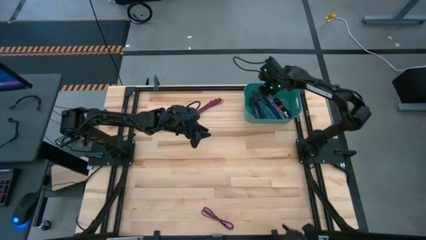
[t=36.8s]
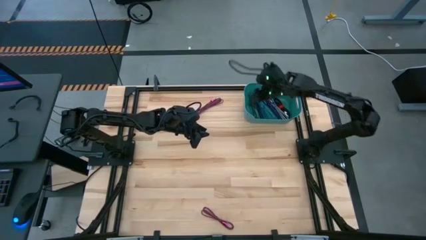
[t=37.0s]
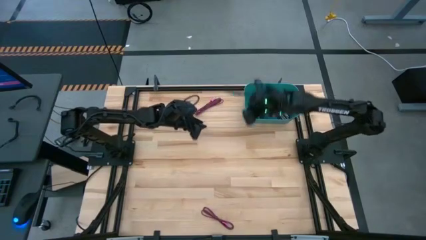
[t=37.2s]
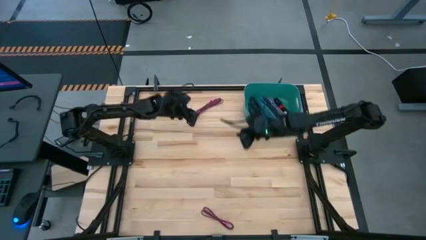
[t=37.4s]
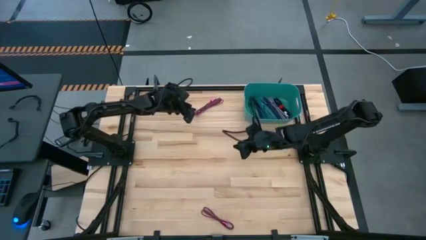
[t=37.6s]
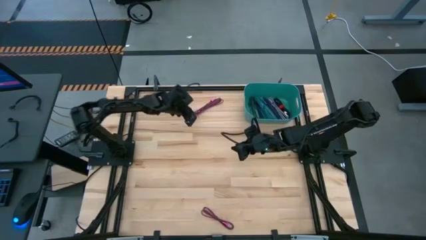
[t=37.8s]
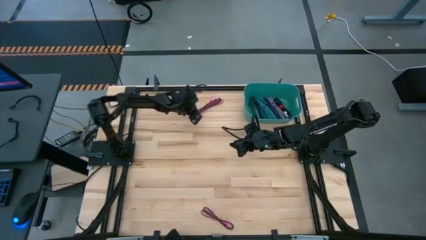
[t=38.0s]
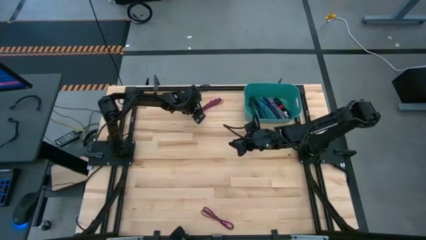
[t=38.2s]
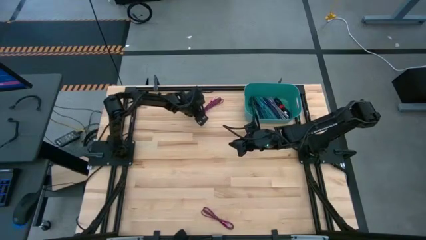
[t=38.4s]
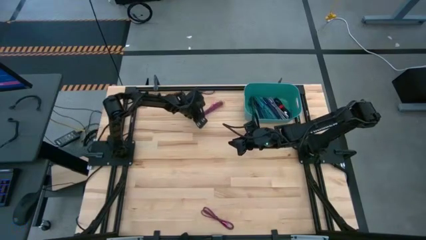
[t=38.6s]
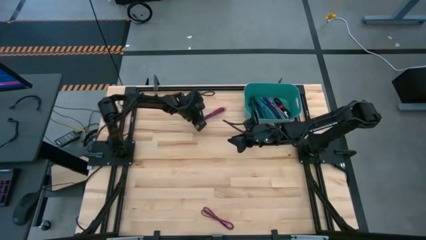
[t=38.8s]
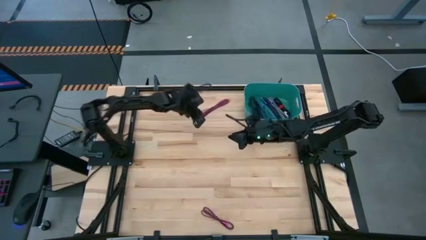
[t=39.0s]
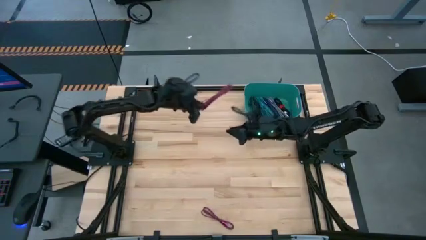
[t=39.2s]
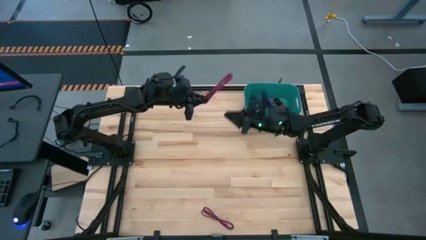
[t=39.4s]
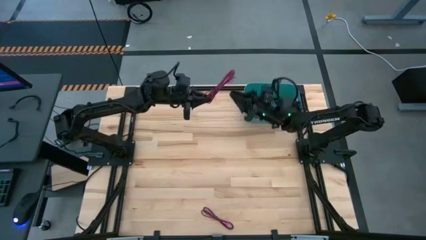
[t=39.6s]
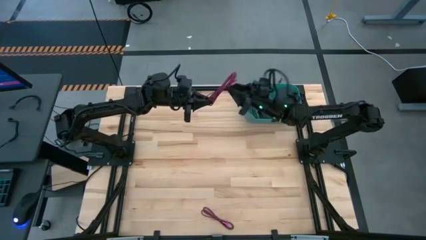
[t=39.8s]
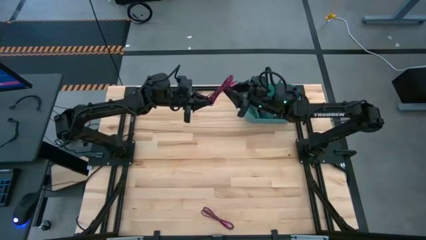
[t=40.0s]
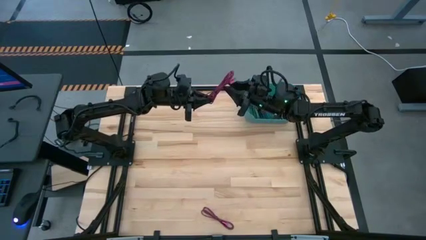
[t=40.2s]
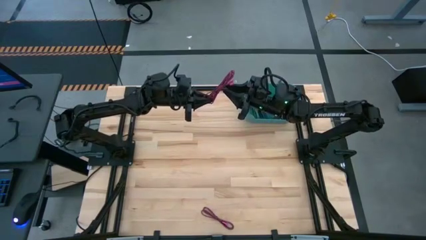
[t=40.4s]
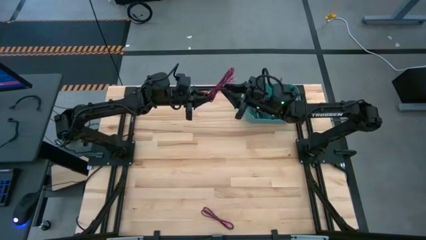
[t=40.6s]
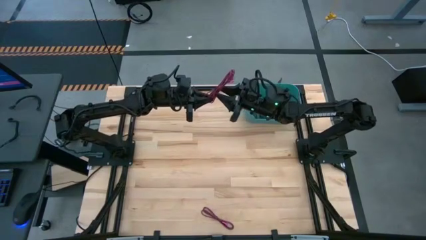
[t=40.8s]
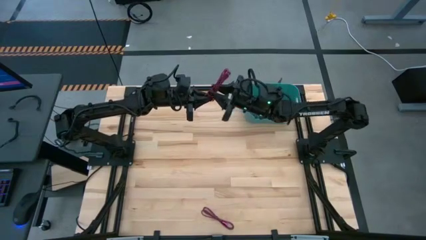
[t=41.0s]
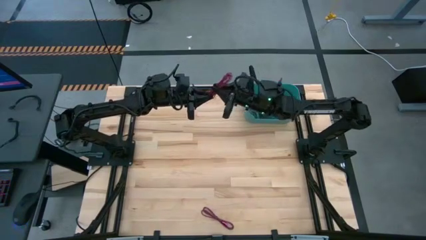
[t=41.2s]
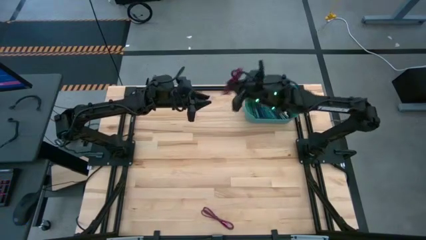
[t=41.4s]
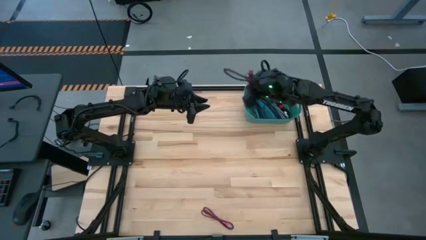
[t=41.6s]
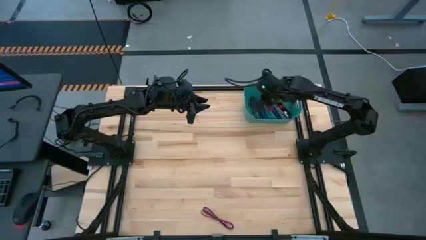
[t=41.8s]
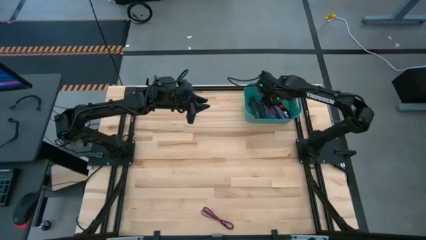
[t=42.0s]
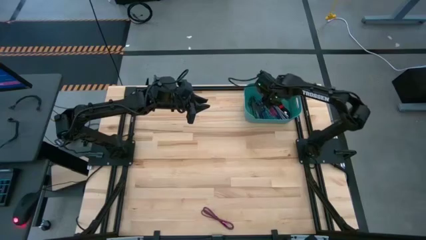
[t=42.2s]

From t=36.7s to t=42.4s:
Task: Pick and place USB-C Cables
Put the pink charger cable into the blue bin

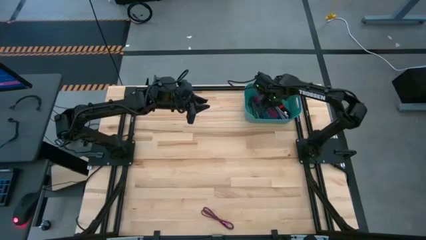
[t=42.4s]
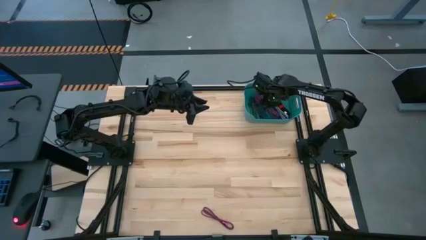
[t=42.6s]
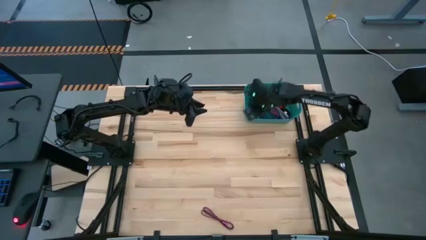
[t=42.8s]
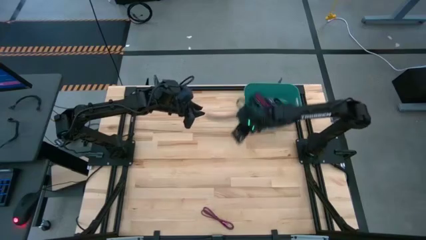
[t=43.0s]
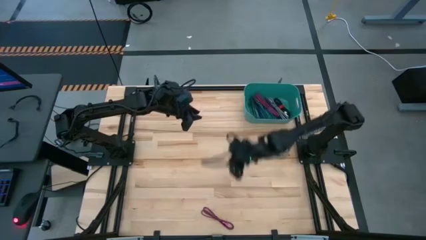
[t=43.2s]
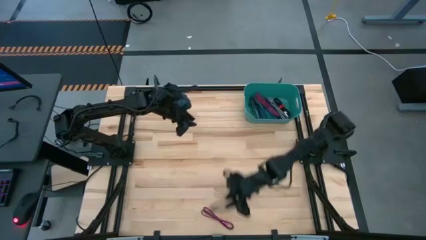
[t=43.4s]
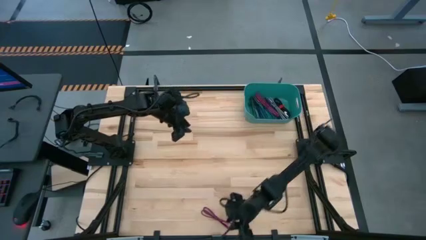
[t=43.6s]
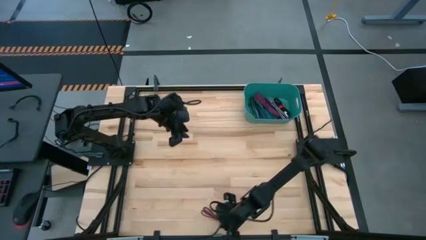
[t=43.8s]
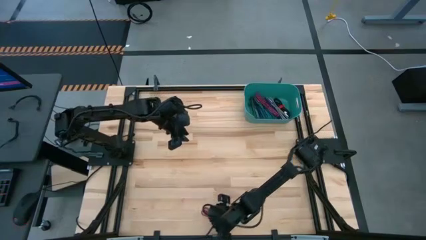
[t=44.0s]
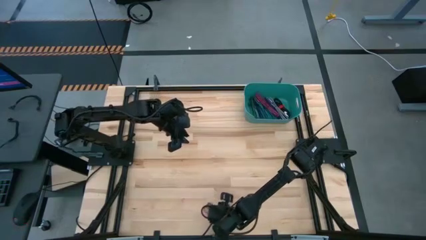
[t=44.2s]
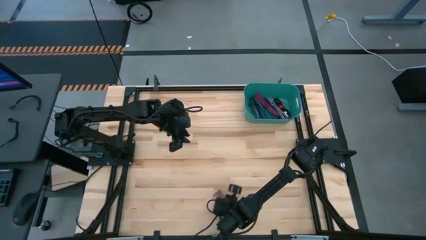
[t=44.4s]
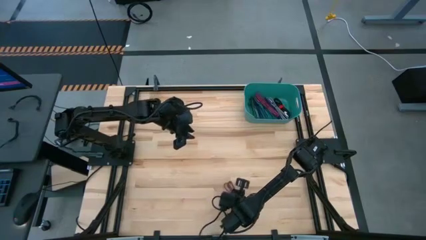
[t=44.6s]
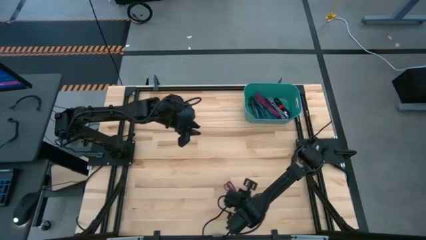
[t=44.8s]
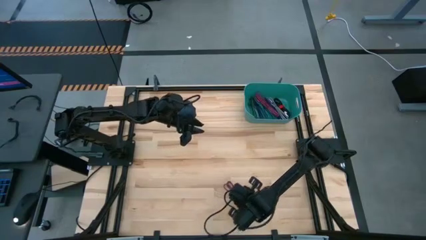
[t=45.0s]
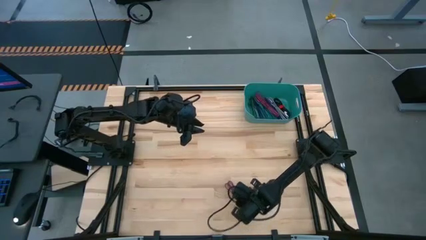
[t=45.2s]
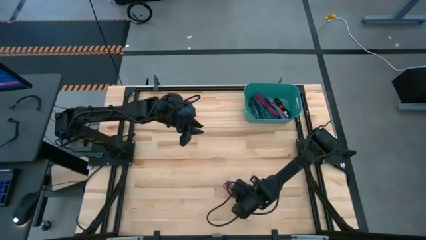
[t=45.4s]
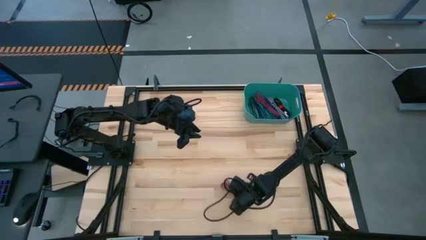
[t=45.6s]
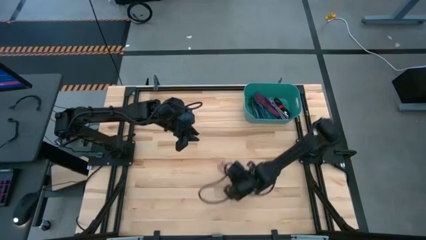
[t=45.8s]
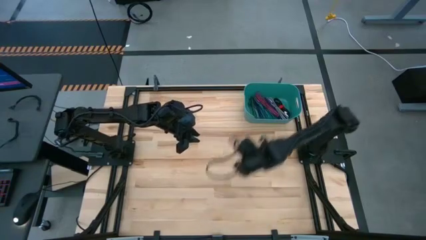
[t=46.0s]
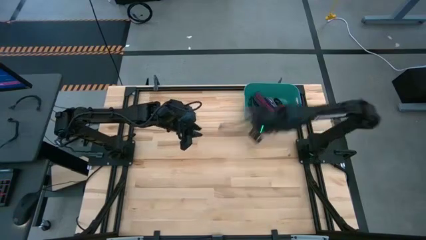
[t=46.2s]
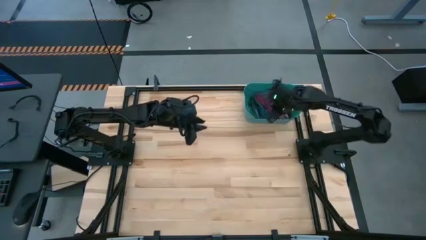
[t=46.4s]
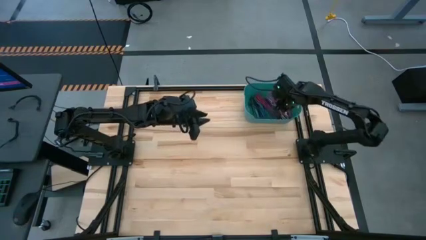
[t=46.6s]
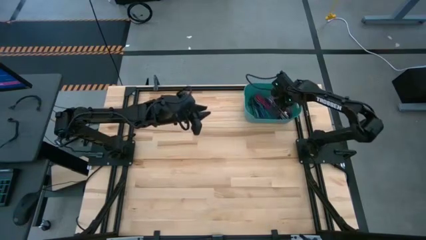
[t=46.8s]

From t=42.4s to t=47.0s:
Put the pink charger cable into the blue bin

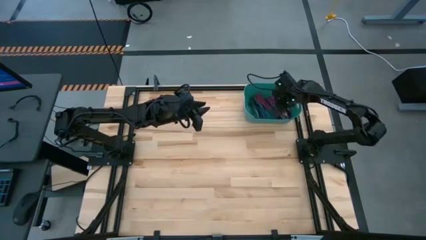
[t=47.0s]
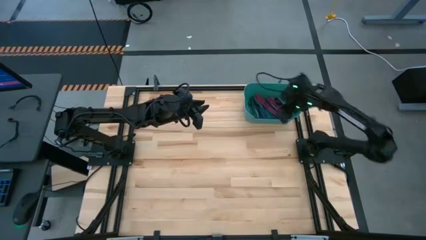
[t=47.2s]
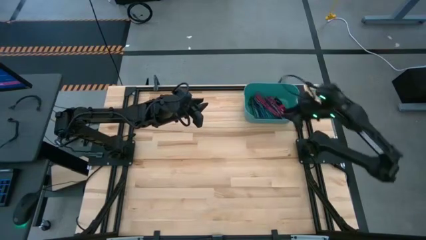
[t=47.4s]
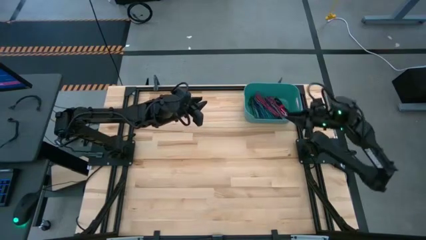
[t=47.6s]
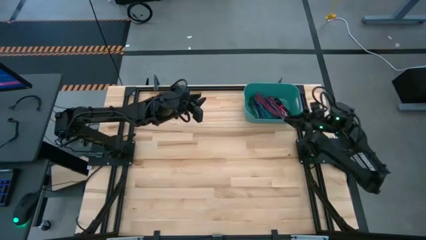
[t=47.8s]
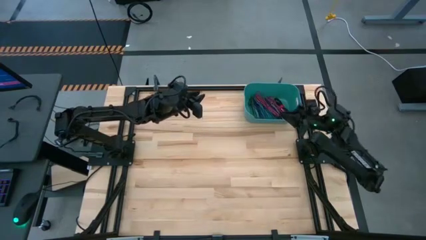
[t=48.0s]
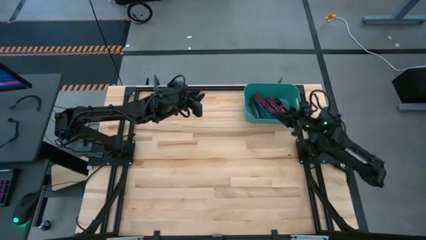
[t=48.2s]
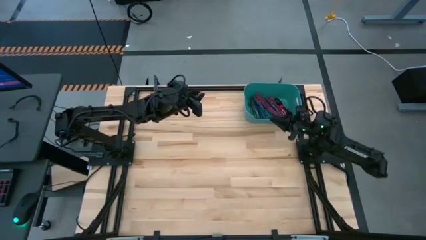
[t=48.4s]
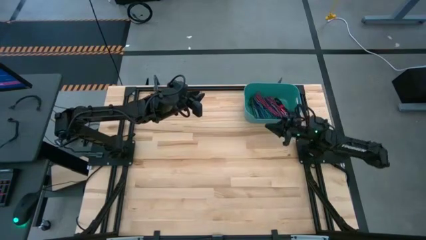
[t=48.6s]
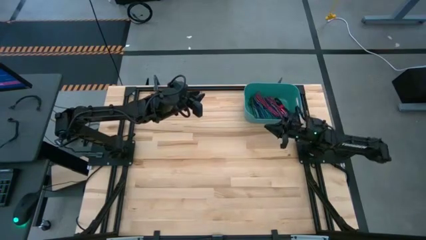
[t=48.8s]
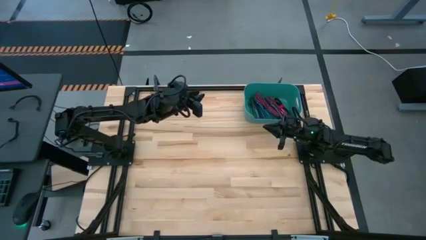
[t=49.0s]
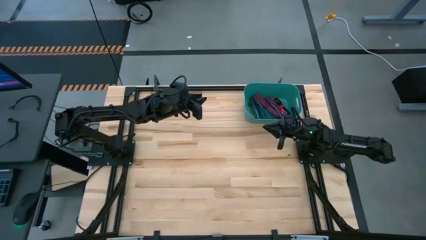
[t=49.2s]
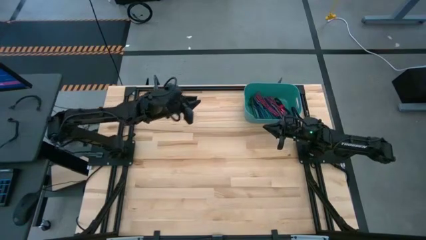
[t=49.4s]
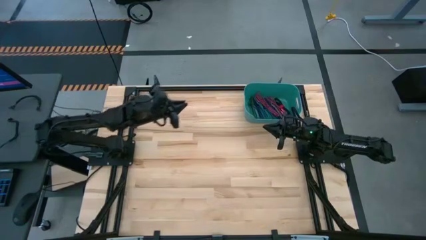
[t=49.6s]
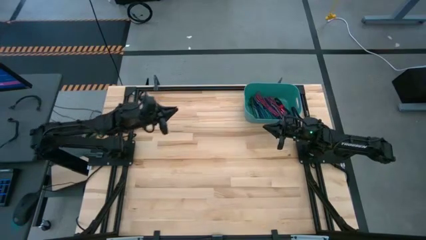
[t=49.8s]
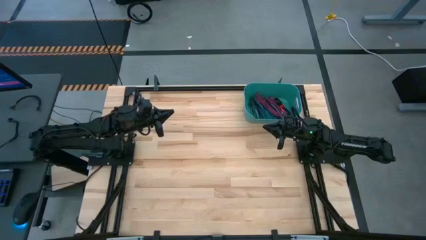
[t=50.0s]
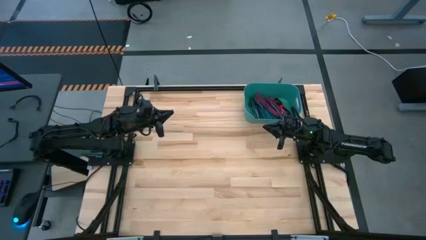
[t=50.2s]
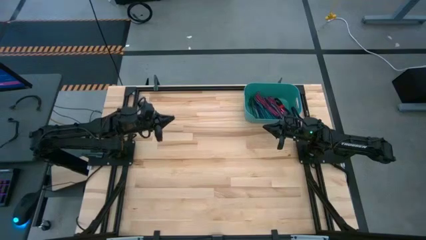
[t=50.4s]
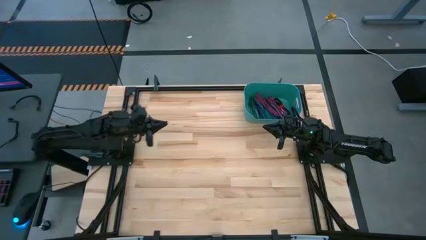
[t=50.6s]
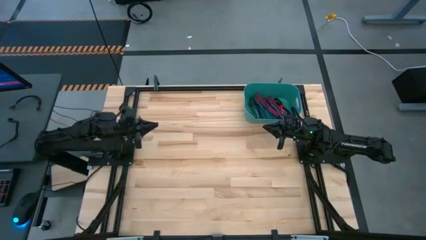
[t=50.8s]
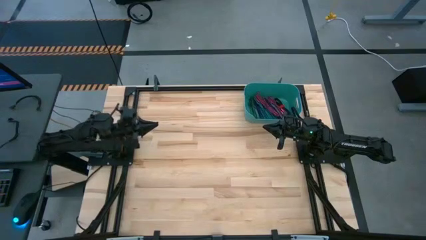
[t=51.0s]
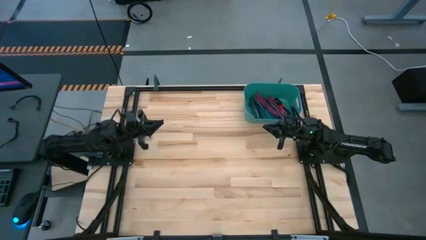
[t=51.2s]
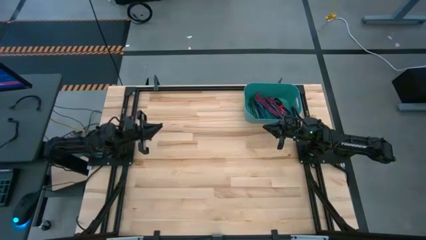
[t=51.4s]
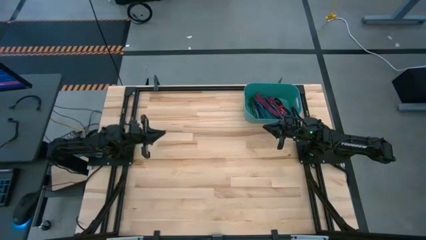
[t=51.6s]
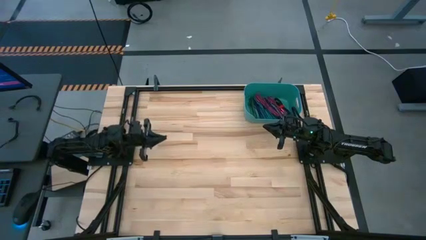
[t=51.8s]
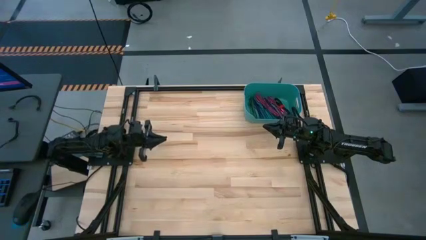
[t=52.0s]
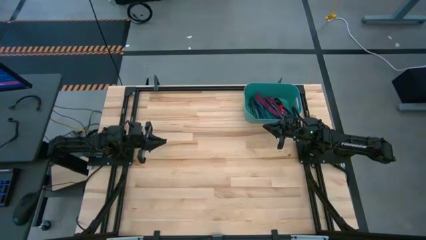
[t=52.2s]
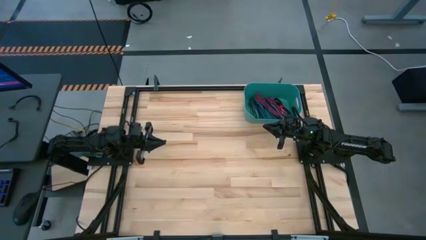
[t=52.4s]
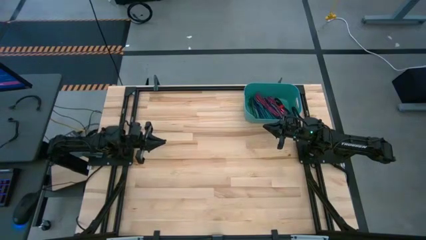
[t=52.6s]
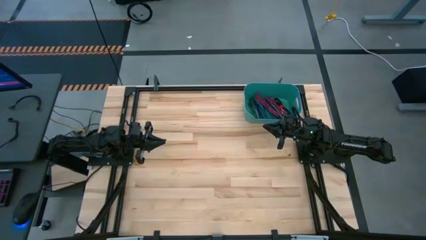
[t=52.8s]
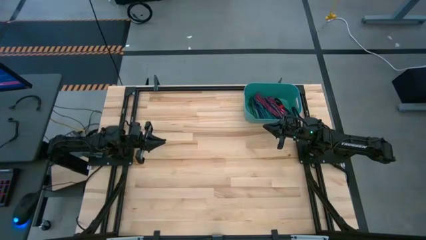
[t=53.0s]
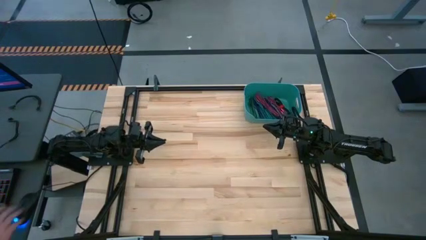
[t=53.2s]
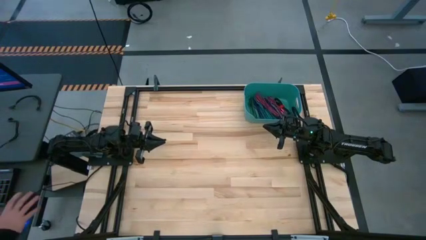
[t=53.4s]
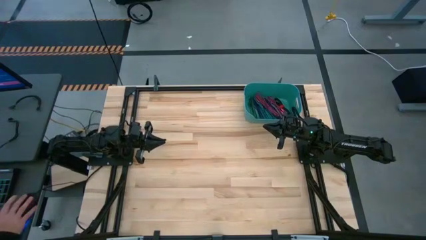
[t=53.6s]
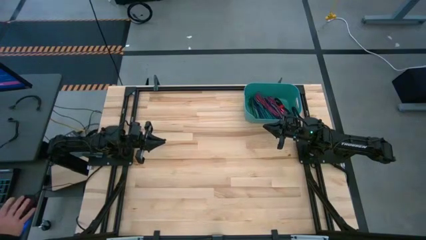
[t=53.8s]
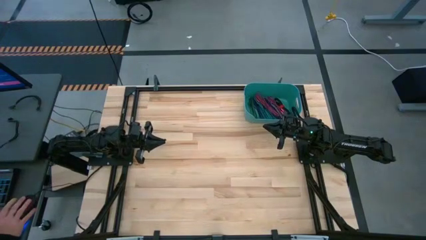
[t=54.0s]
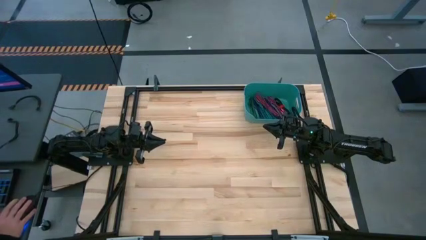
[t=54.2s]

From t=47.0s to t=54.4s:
Return to Home Position
